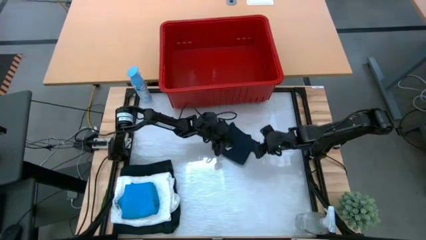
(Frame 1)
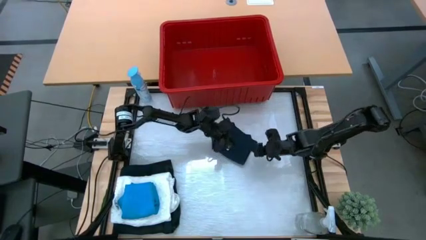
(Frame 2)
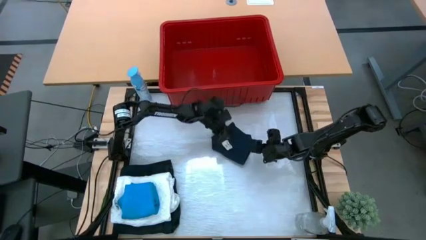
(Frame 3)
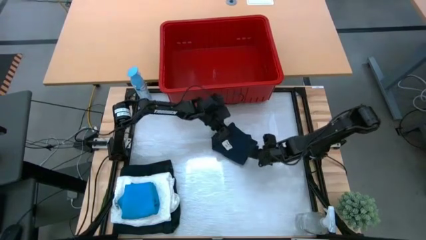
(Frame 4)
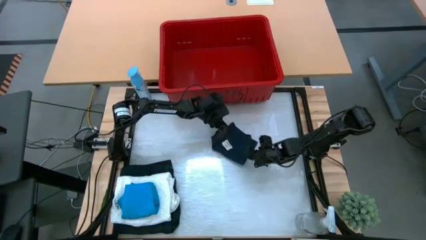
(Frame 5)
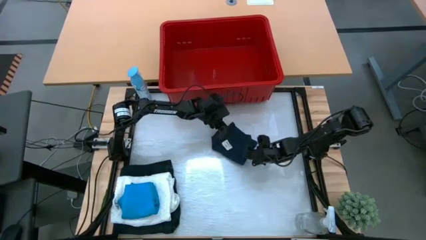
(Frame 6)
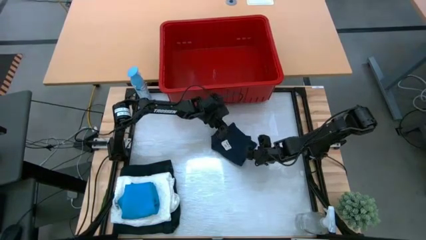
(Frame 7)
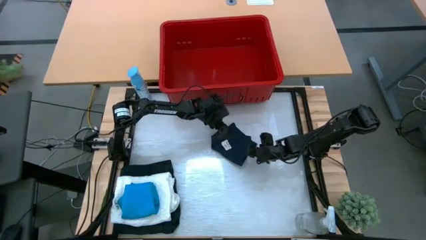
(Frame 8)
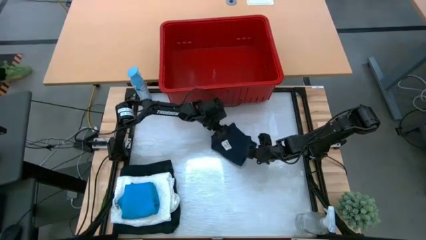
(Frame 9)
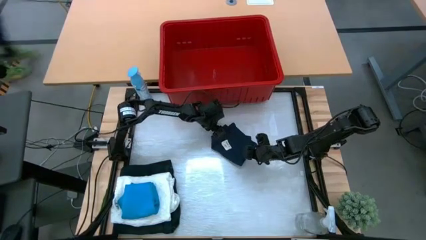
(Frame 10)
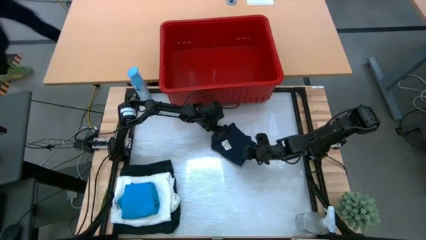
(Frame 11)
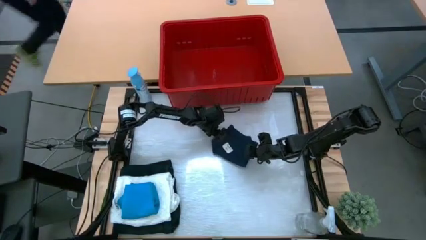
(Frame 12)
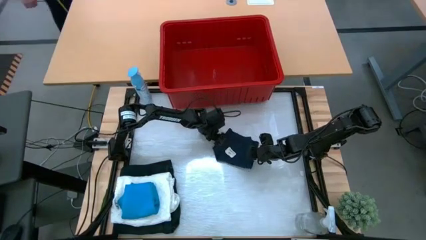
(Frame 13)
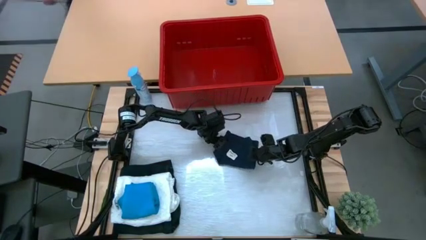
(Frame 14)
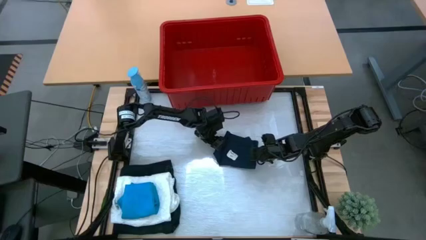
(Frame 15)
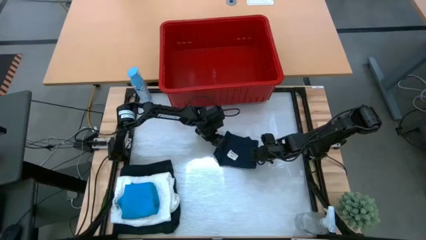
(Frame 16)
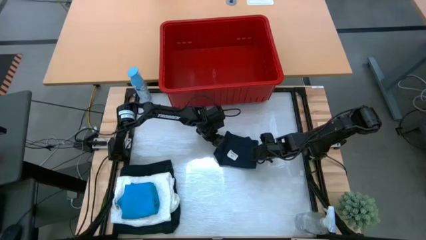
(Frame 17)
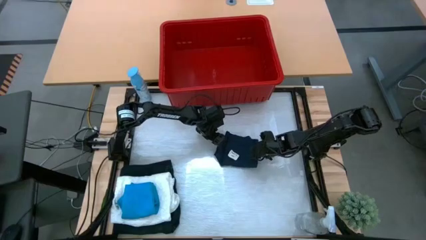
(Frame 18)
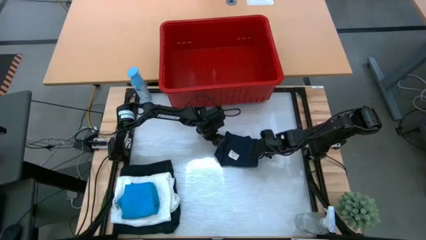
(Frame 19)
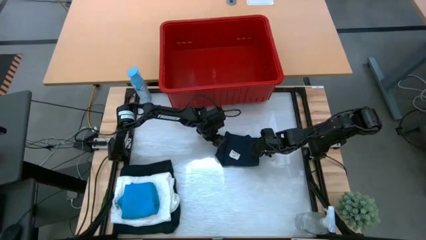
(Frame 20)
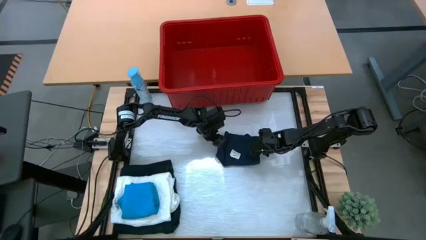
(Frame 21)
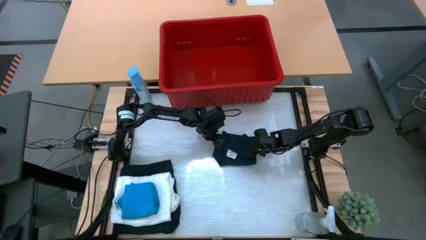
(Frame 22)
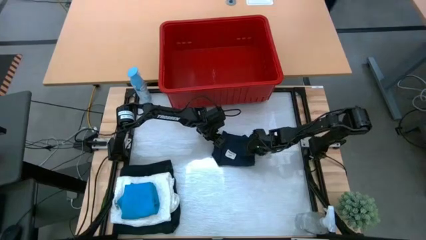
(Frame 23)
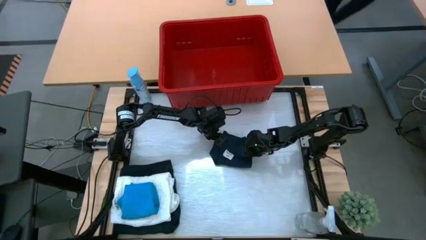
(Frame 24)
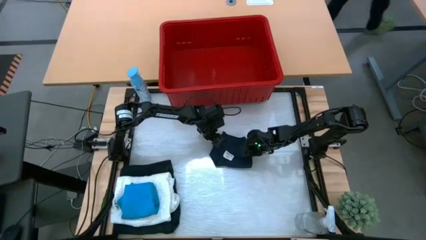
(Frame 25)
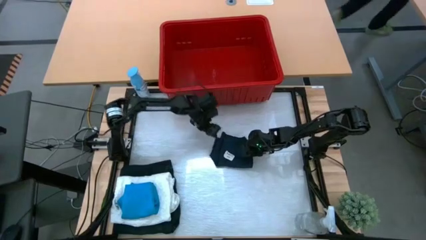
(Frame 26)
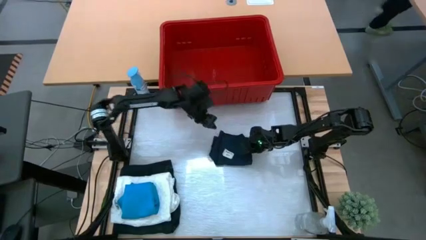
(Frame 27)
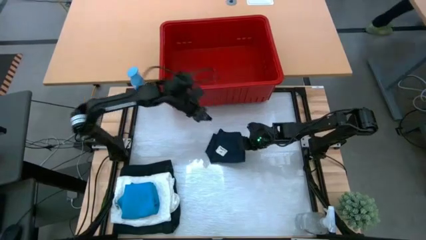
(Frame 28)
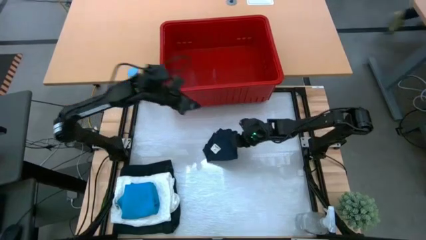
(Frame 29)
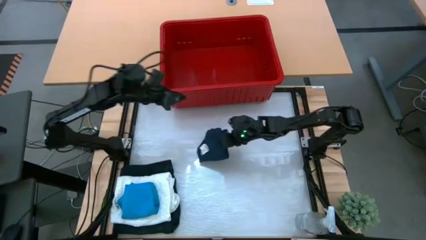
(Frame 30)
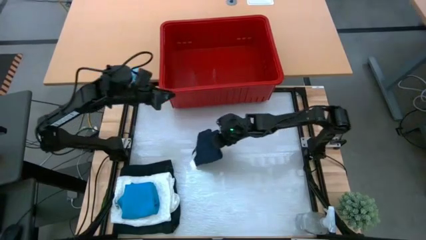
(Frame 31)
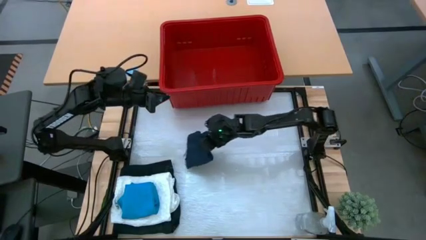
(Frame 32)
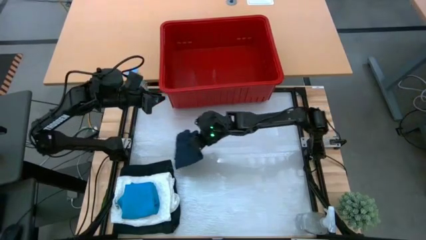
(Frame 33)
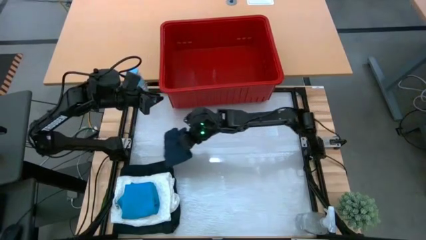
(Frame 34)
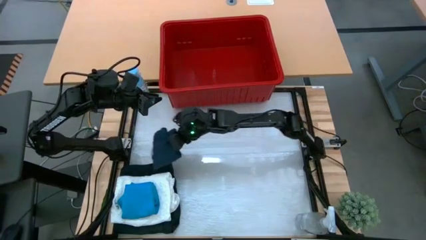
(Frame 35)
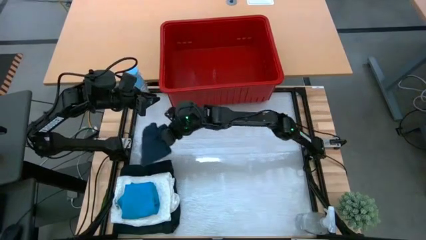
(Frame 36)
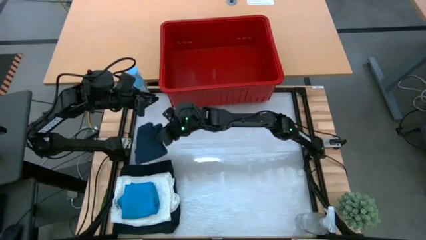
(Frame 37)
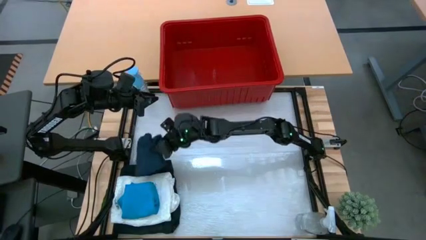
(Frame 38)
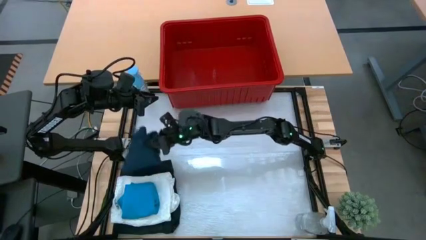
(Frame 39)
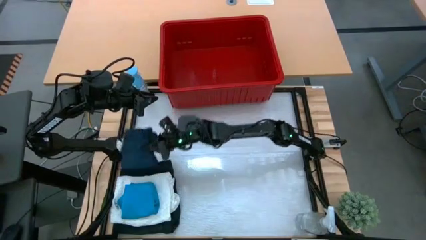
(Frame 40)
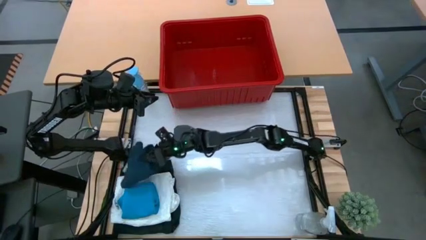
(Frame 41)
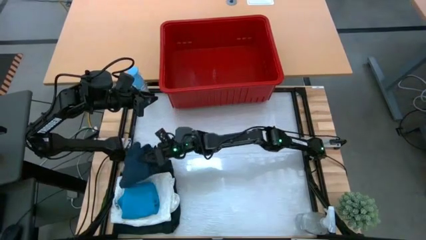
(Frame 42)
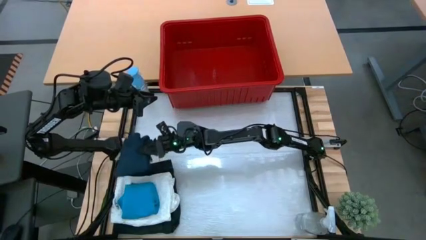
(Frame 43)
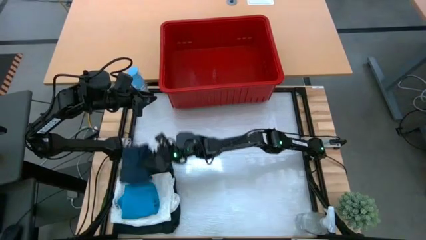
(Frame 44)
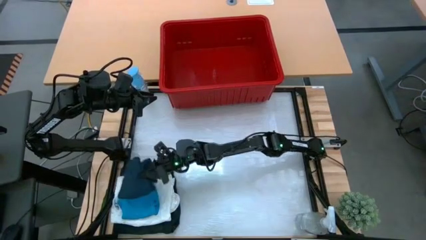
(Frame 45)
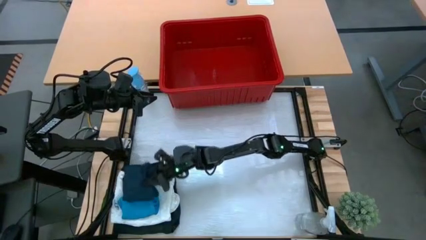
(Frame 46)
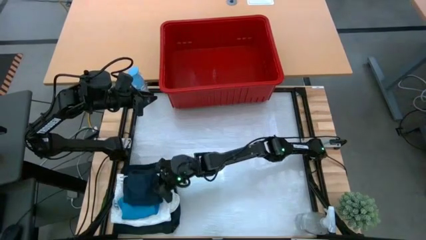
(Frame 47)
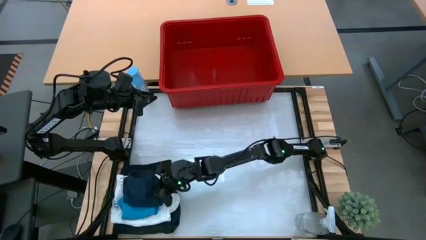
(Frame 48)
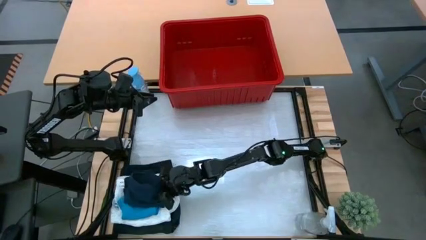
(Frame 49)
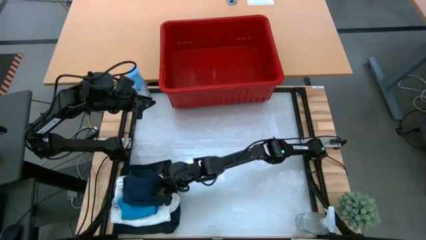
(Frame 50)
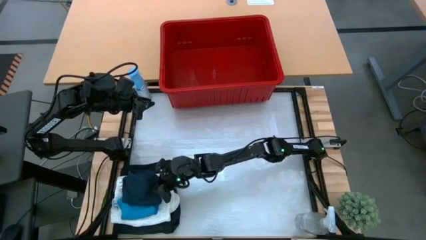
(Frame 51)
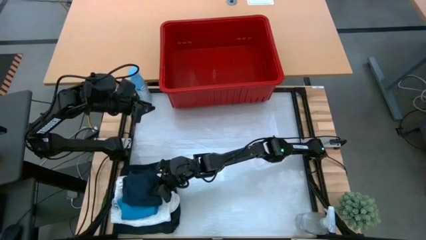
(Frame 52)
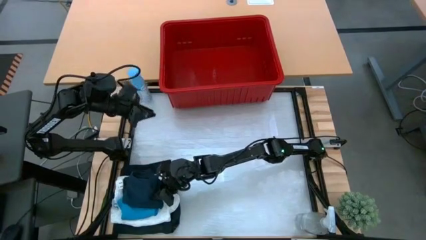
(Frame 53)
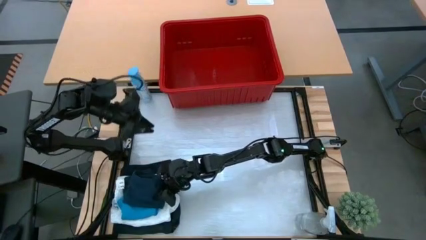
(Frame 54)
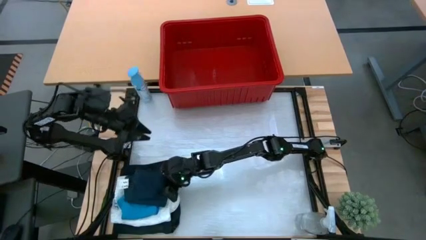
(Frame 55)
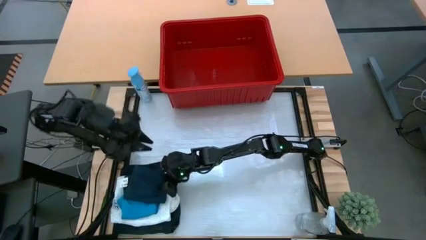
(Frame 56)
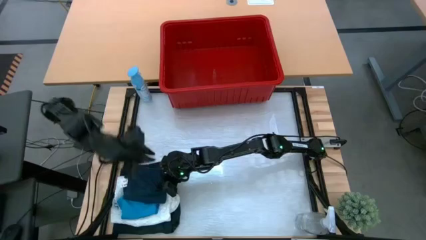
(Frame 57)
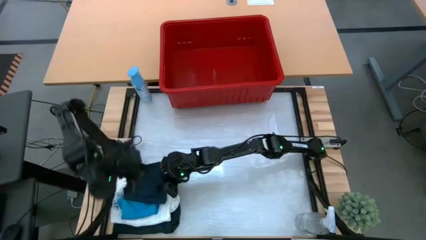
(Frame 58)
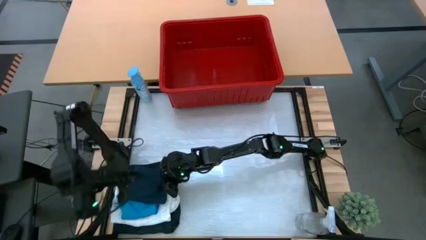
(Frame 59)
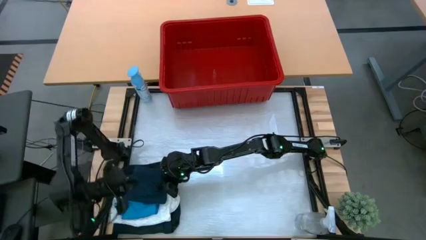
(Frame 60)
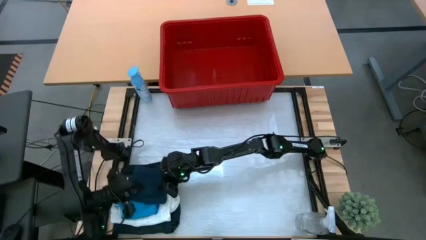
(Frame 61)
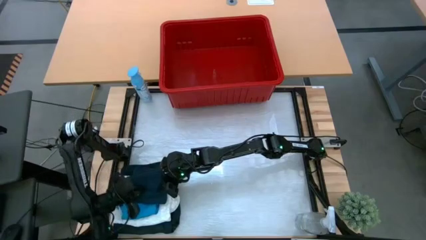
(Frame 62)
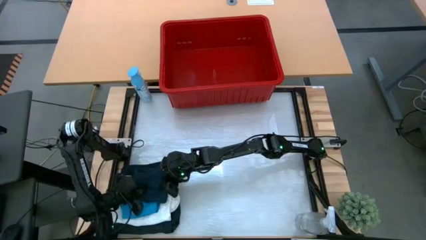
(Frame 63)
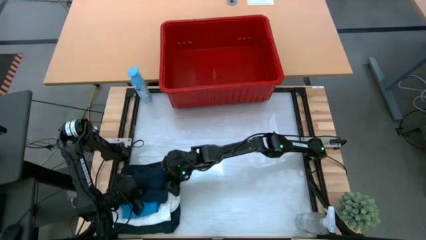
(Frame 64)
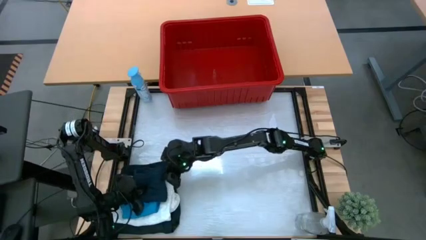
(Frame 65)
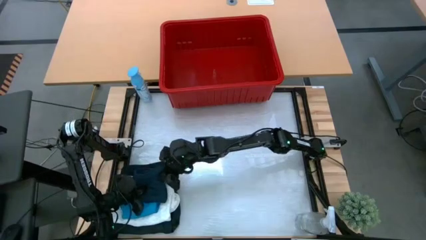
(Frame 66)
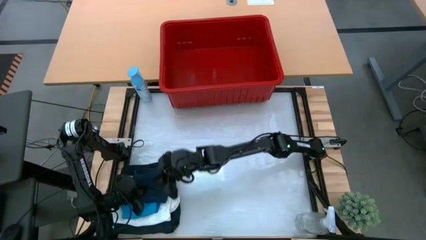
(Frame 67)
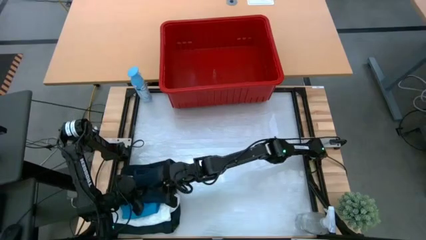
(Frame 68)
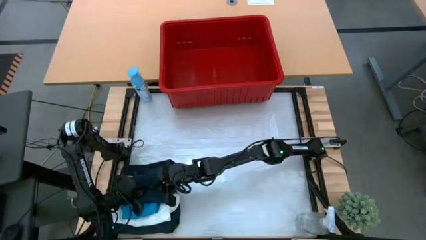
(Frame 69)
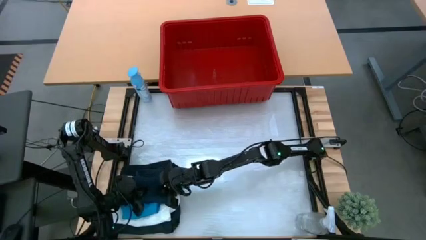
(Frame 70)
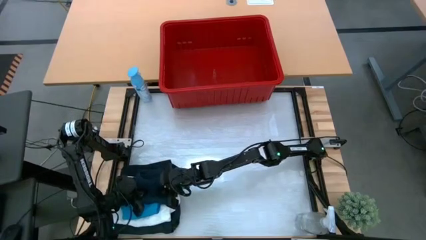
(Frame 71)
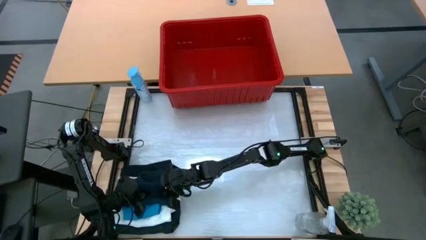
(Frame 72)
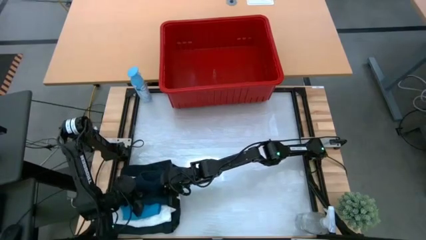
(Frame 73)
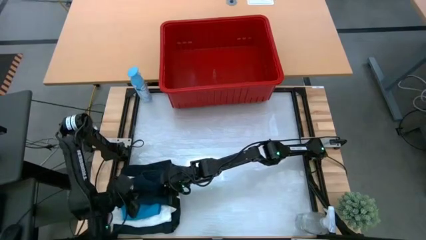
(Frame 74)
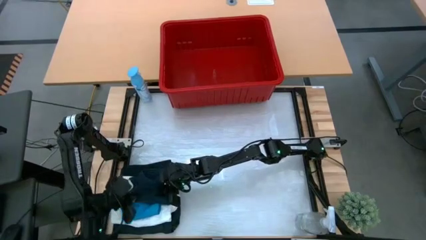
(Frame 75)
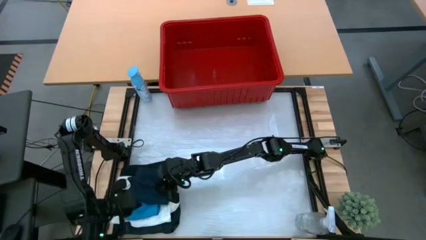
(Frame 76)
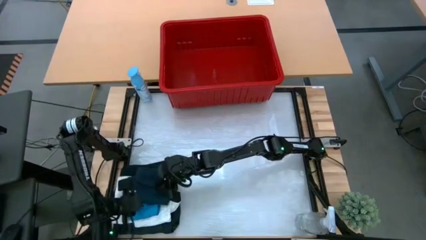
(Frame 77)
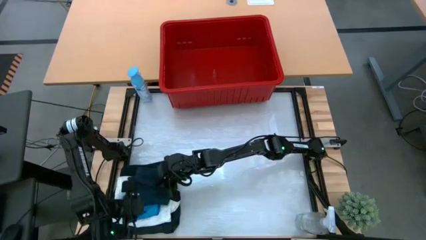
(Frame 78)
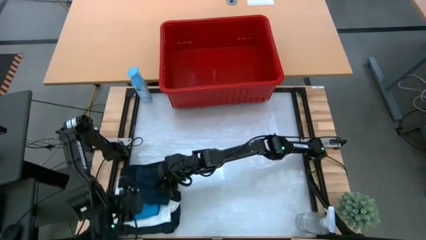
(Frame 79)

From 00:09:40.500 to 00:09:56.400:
Task: Fold Laundry from Bin
Stack the gray shorts on top of the blue shorts
